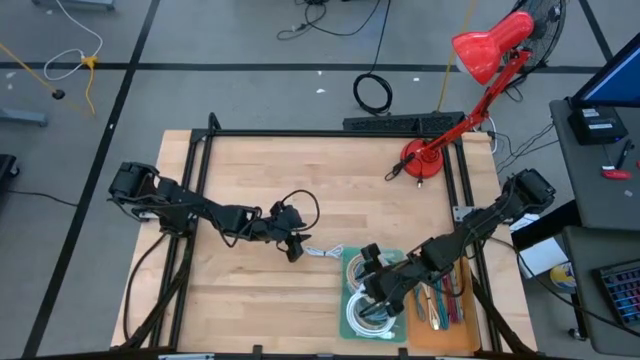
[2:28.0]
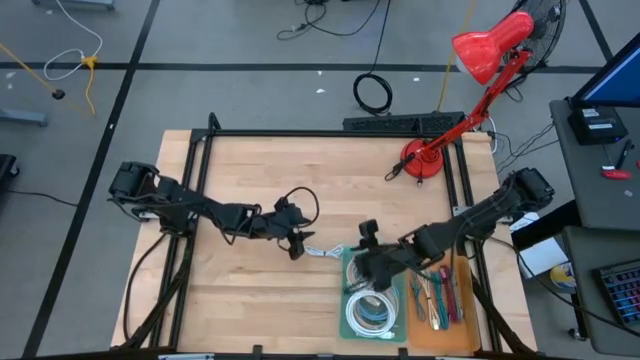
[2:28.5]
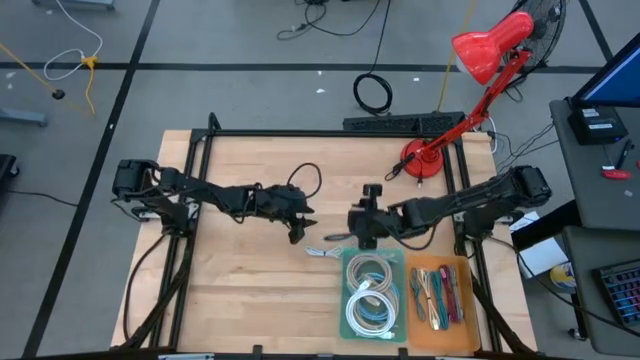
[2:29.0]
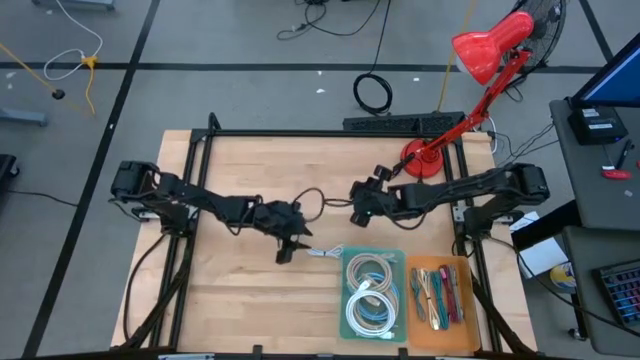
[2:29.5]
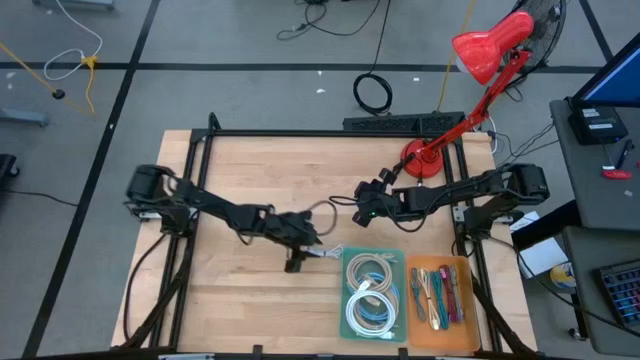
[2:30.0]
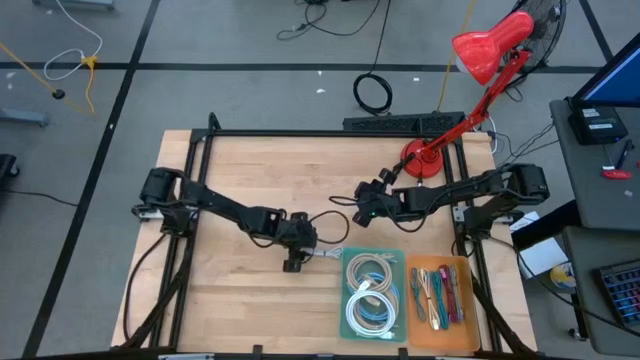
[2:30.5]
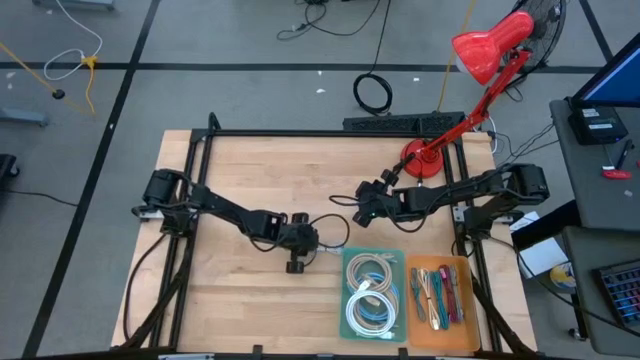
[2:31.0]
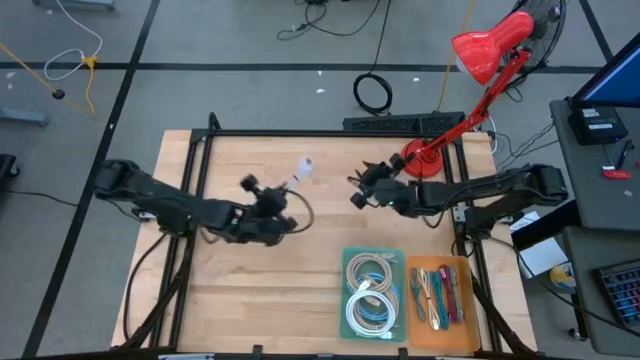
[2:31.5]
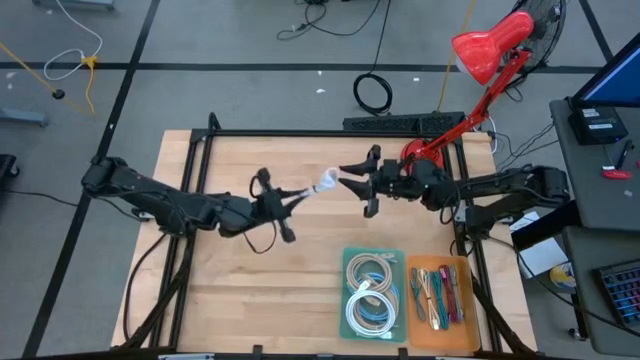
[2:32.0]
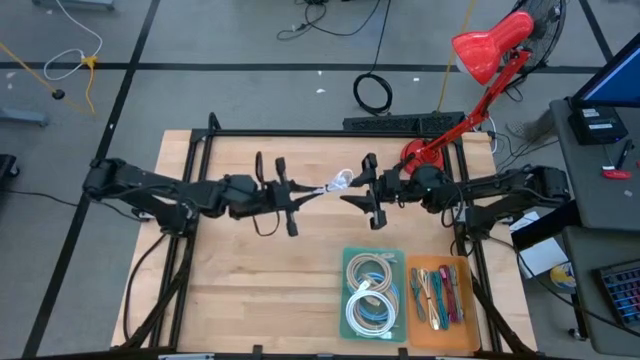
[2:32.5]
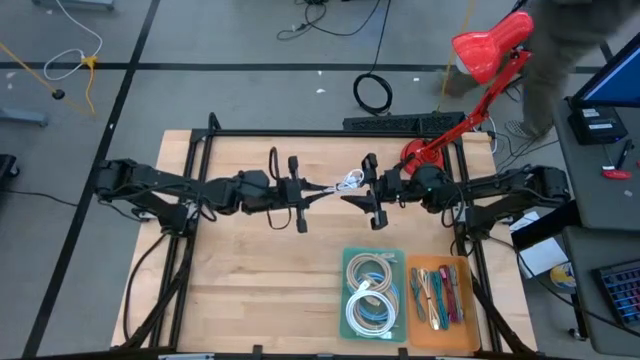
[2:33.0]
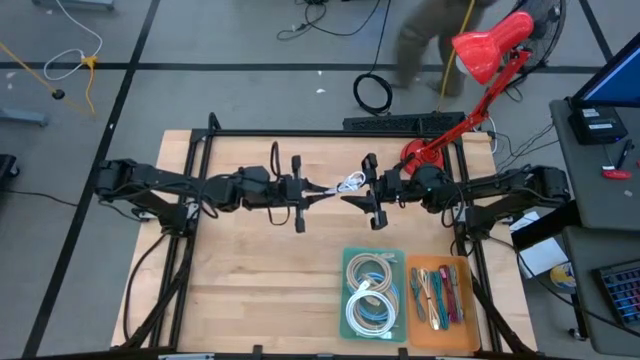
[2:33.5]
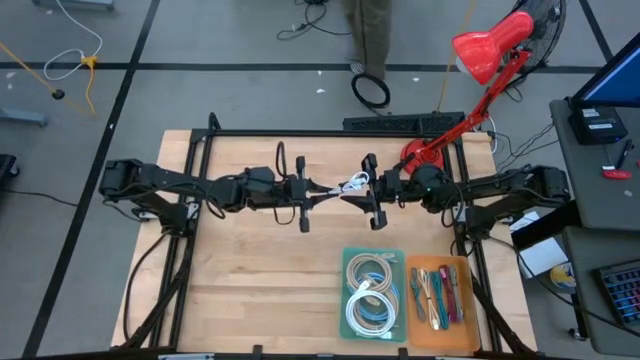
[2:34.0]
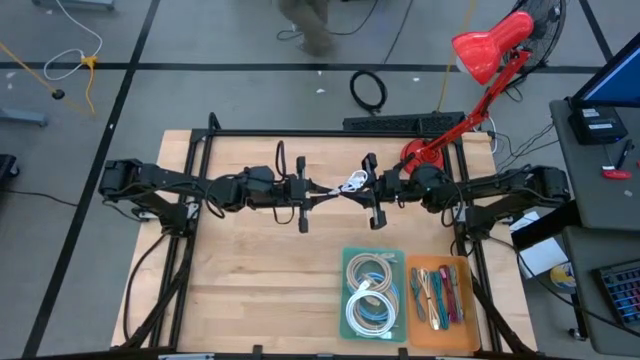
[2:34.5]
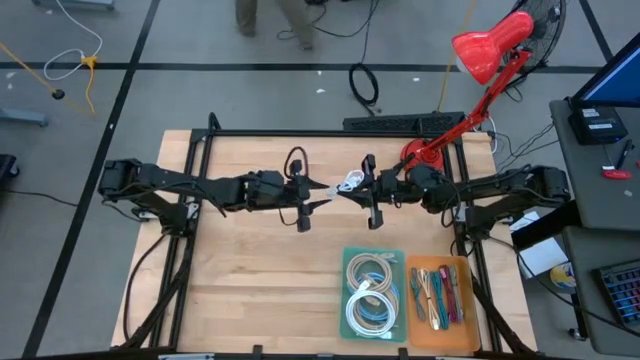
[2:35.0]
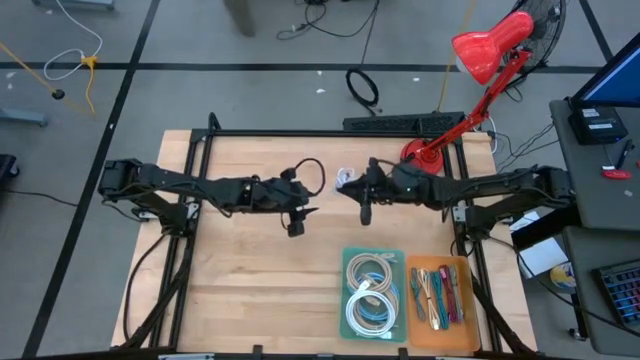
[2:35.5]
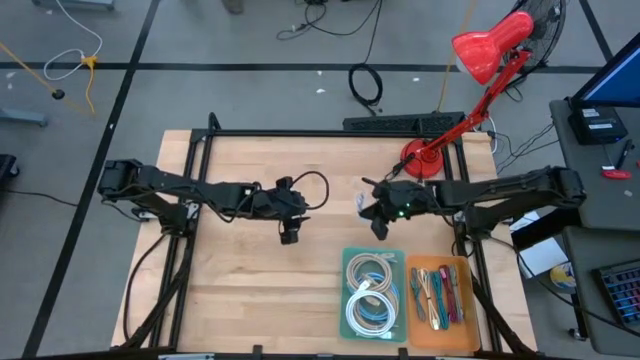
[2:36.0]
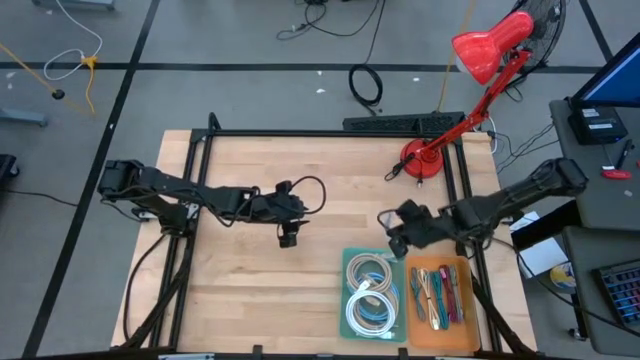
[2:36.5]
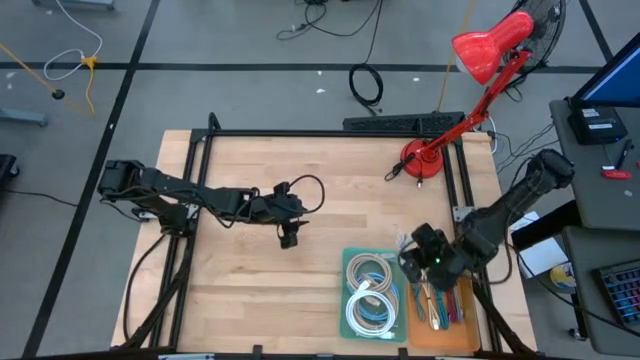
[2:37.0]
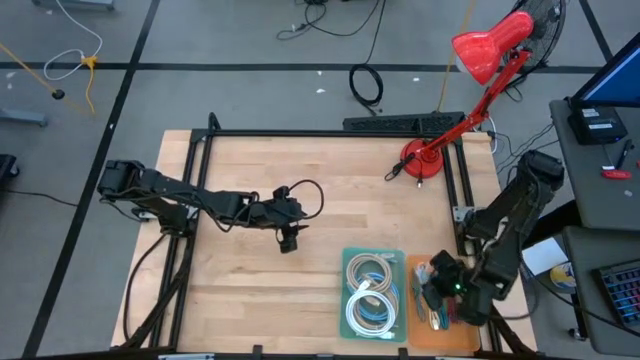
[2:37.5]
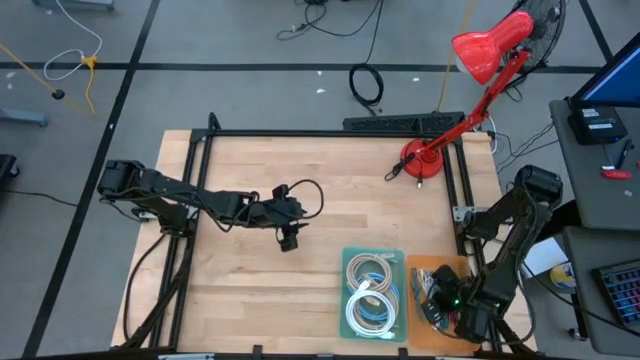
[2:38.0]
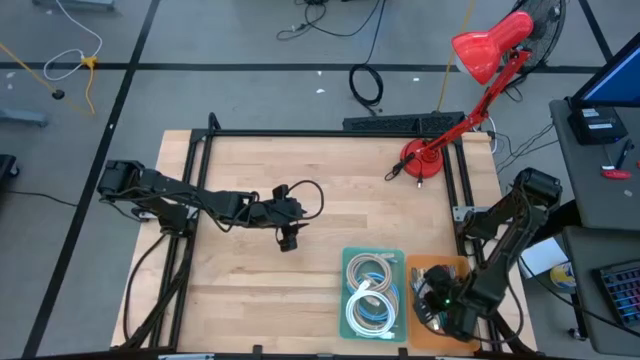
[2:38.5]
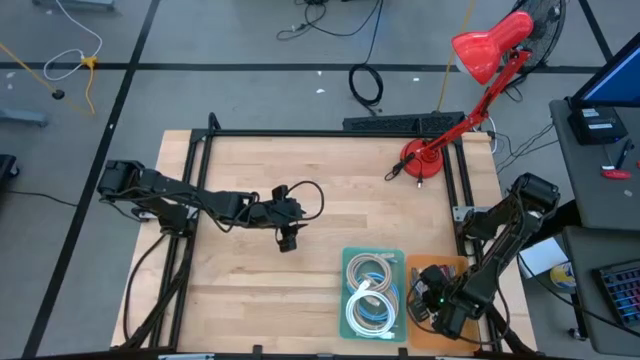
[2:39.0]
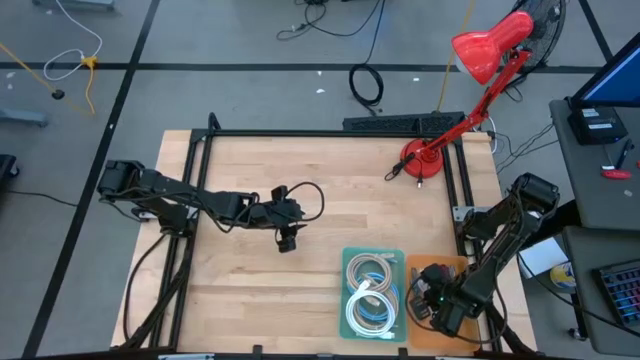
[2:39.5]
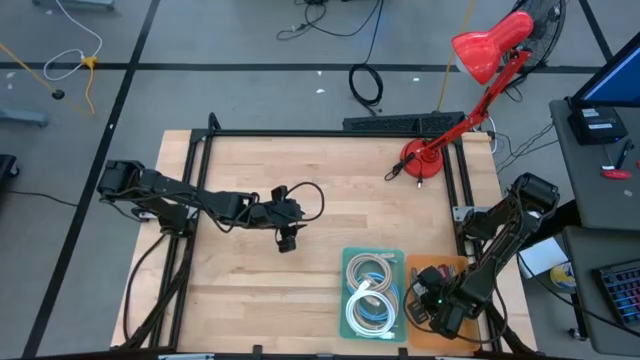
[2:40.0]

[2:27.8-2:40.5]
Task: Pick & Place USB Port
Put the white charger cable into the orange bin

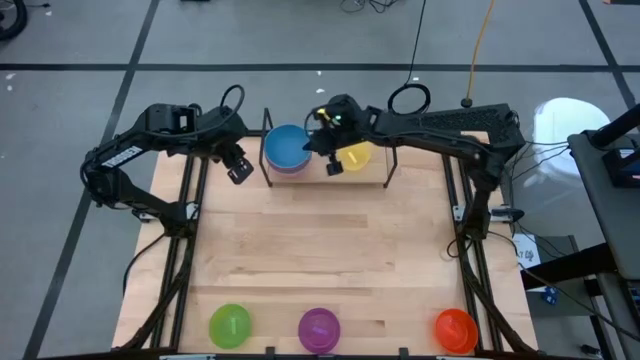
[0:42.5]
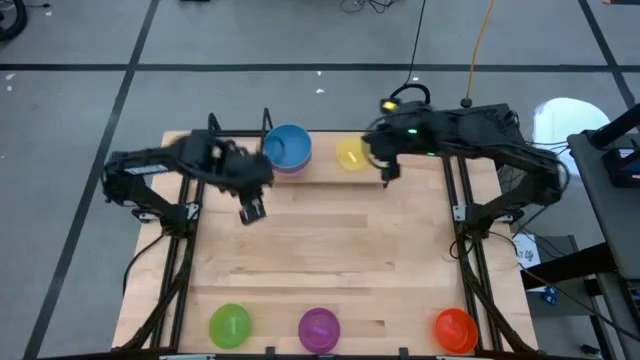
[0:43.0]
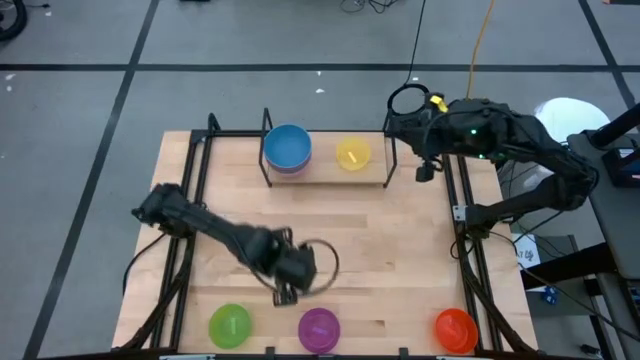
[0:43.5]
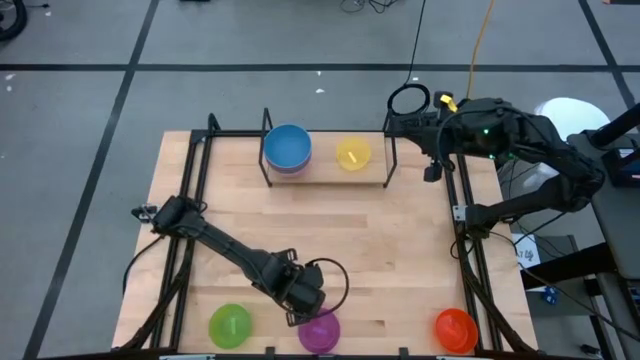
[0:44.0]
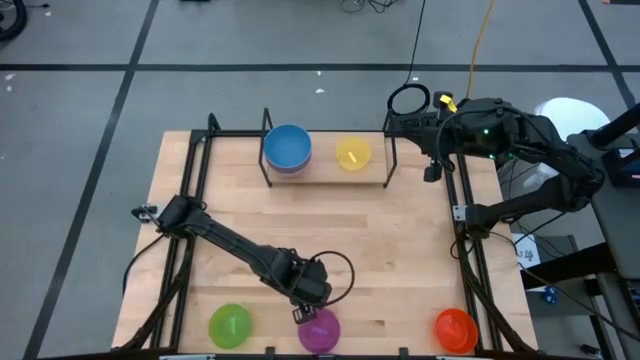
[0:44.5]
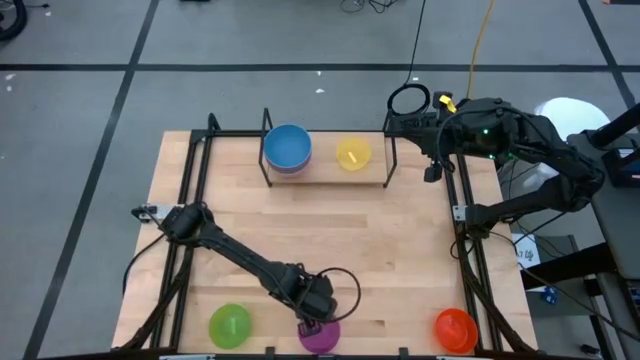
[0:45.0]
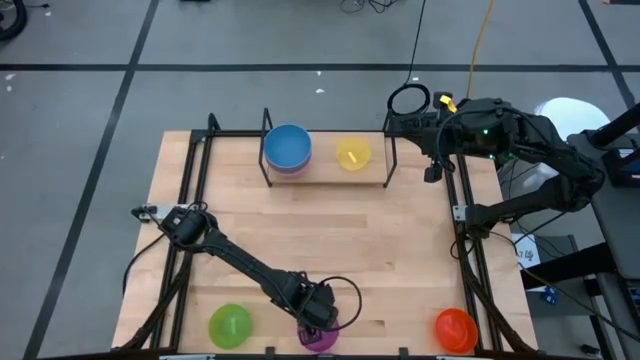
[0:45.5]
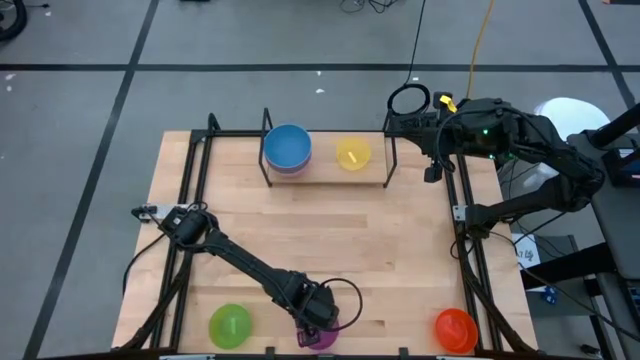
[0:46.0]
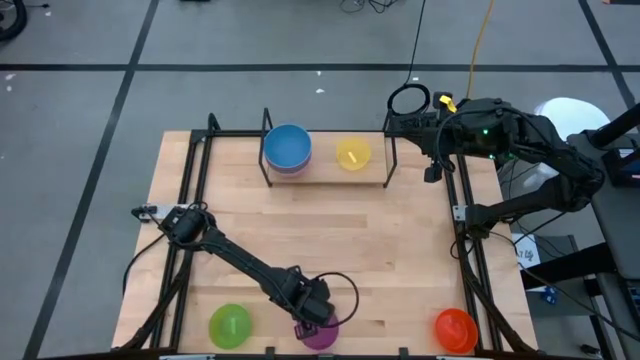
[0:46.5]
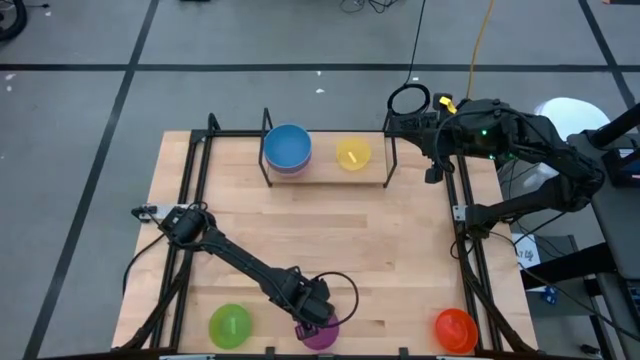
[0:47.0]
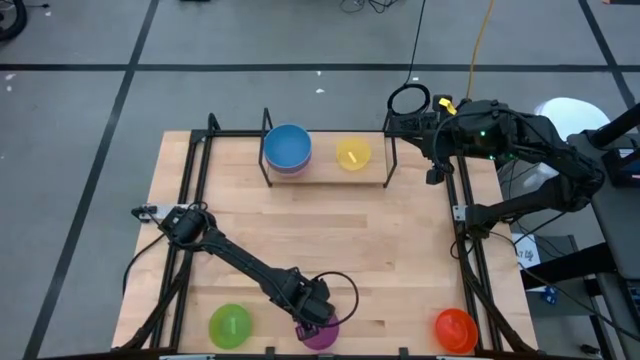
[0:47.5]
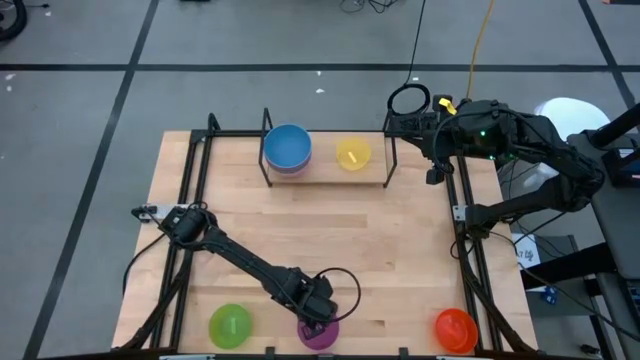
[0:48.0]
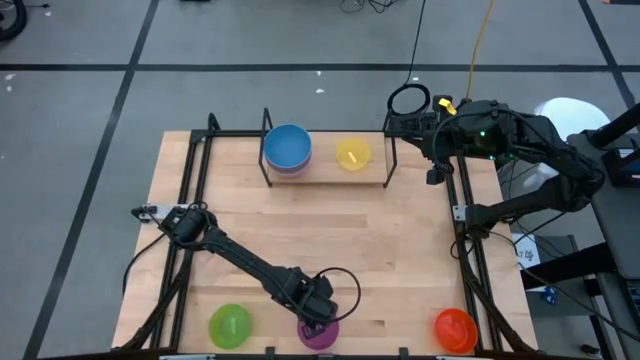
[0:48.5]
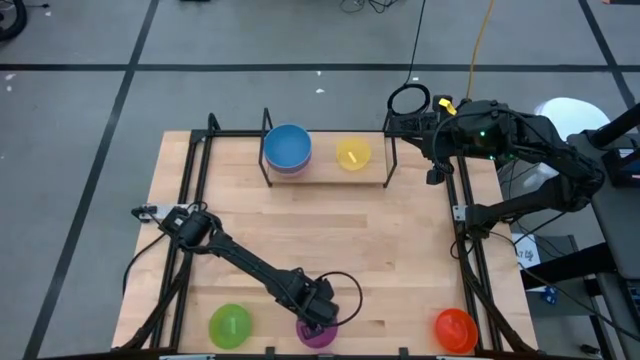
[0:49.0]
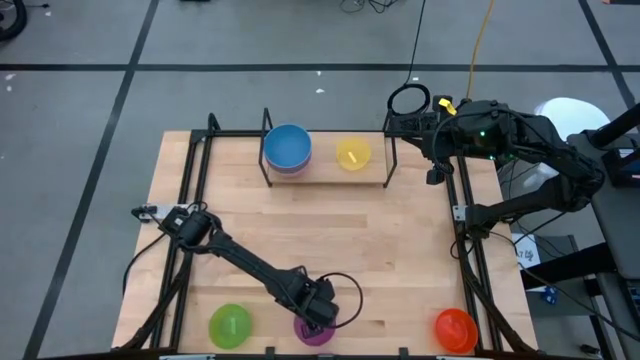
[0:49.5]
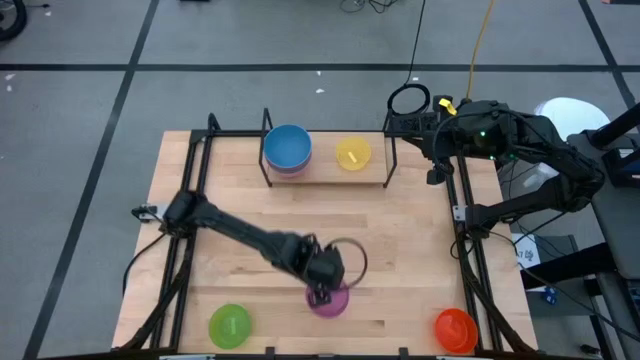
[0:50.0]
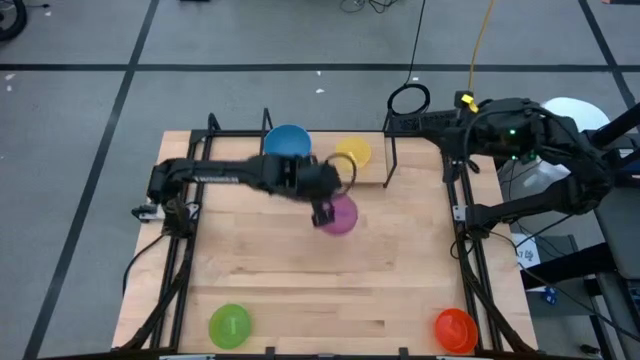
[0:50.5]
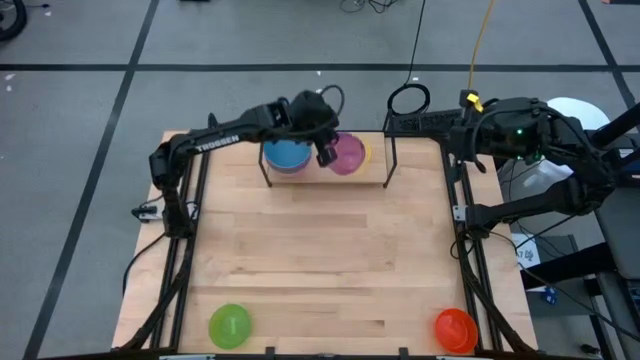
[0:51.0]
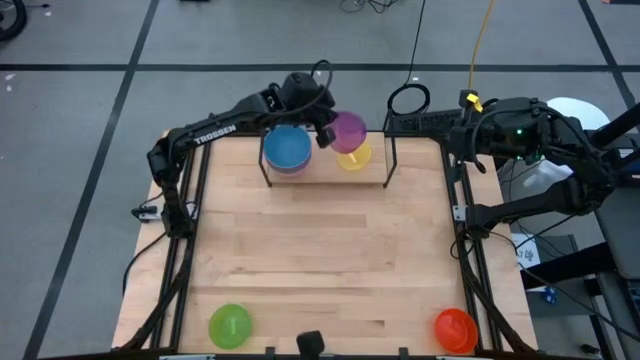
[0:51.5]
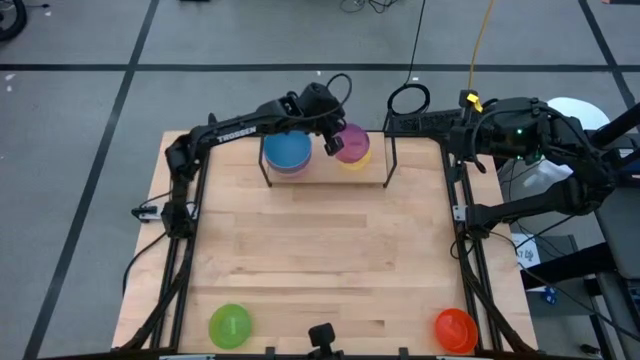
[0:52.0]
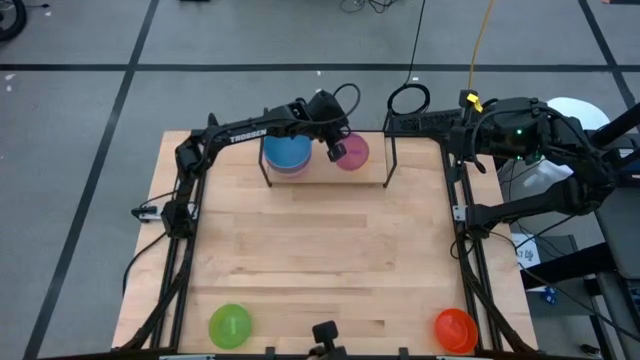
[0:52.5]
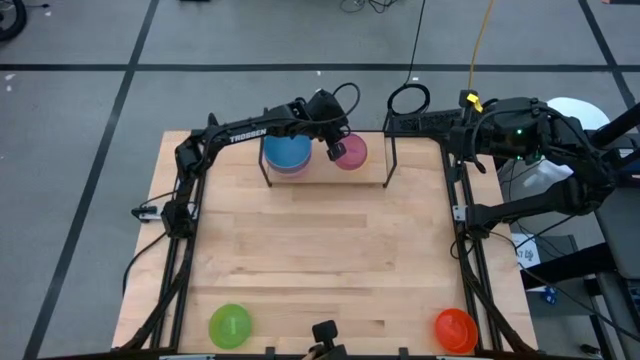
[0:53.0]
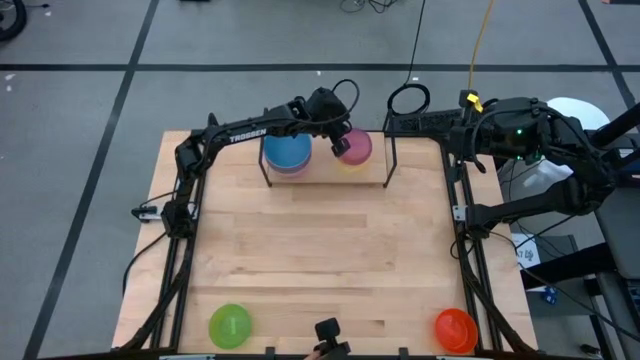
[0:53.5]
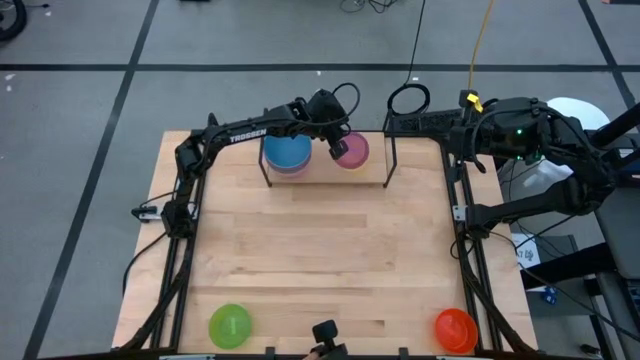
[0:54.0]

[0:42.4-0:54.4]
Task: Place and stack bowls onto a shelf
Stack the purple bowl on top of the yellow bowl on the shelf
